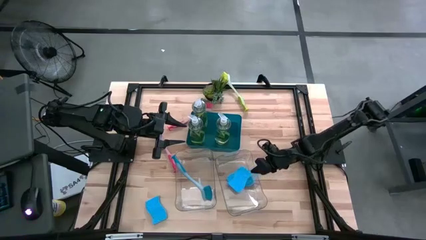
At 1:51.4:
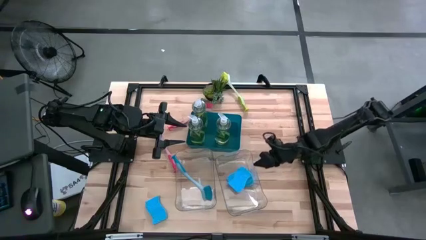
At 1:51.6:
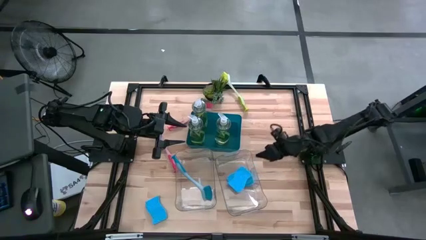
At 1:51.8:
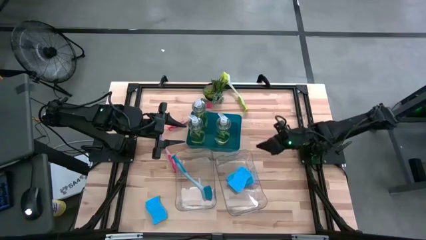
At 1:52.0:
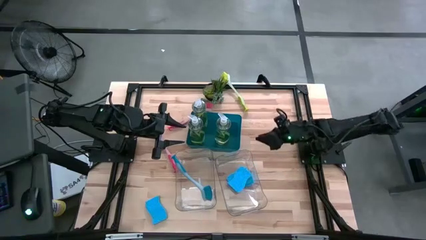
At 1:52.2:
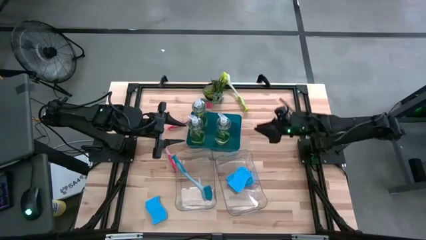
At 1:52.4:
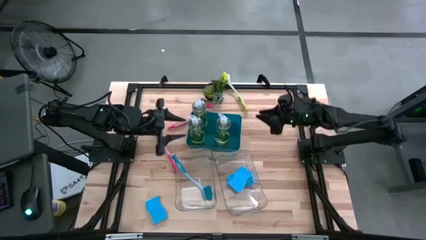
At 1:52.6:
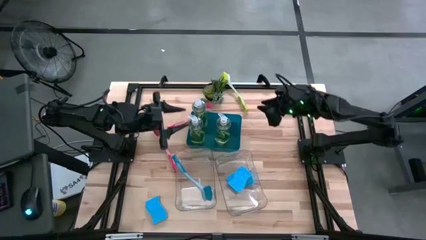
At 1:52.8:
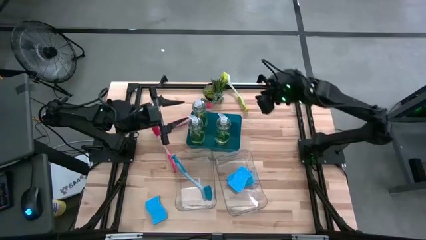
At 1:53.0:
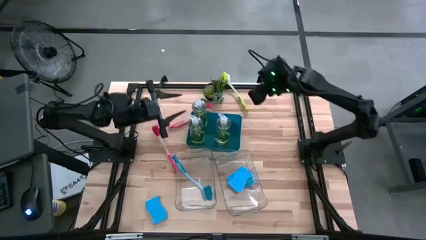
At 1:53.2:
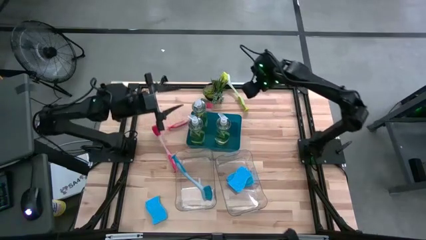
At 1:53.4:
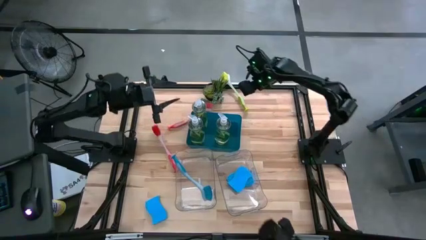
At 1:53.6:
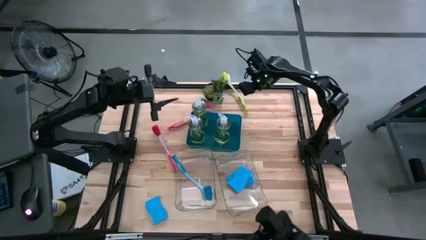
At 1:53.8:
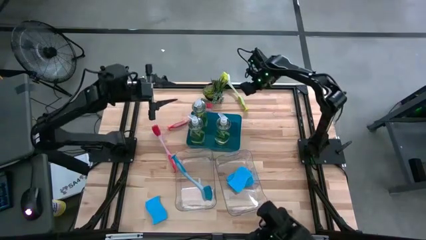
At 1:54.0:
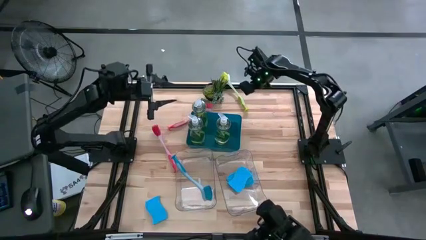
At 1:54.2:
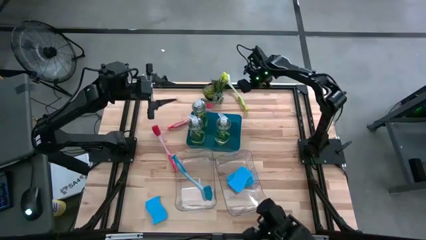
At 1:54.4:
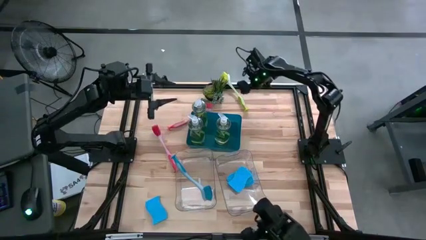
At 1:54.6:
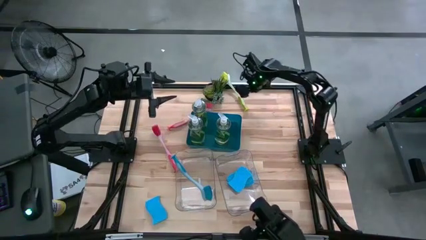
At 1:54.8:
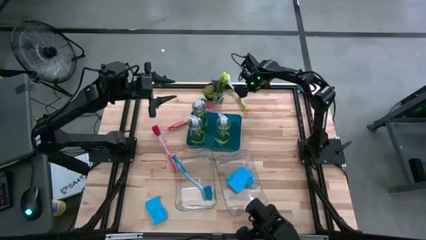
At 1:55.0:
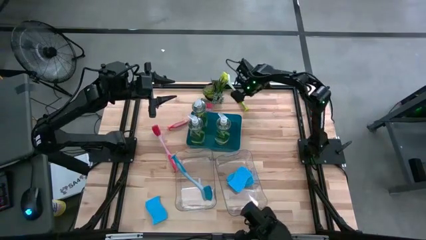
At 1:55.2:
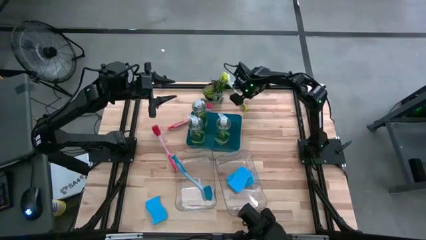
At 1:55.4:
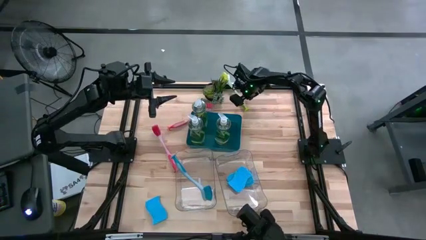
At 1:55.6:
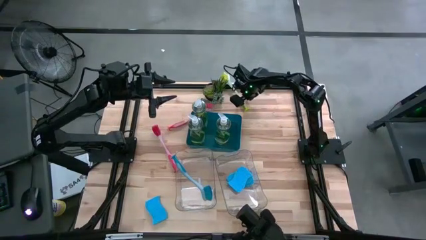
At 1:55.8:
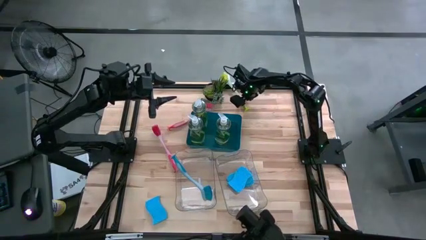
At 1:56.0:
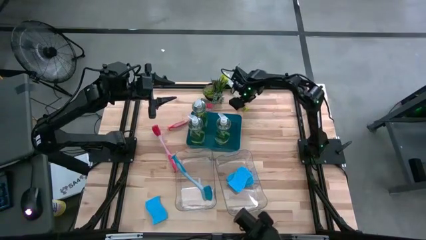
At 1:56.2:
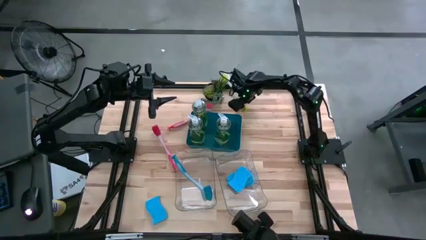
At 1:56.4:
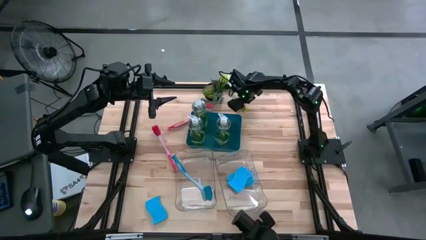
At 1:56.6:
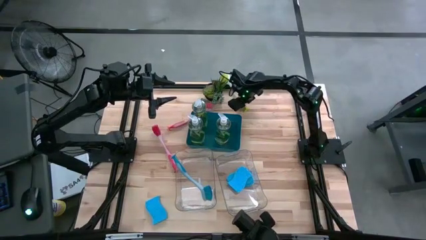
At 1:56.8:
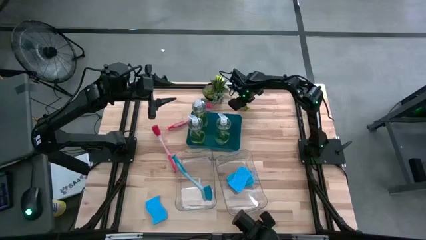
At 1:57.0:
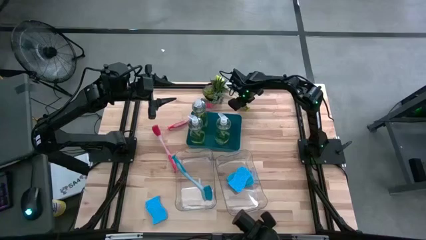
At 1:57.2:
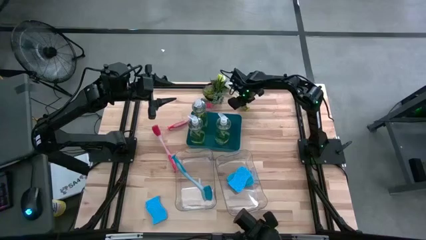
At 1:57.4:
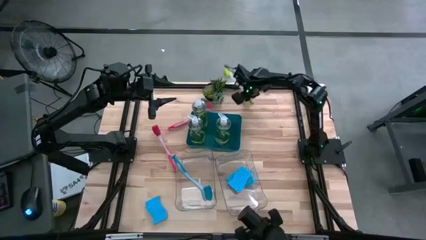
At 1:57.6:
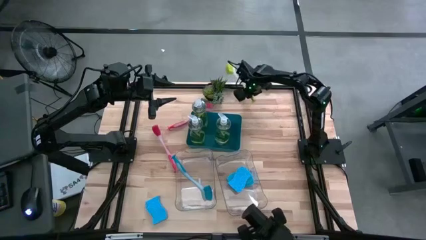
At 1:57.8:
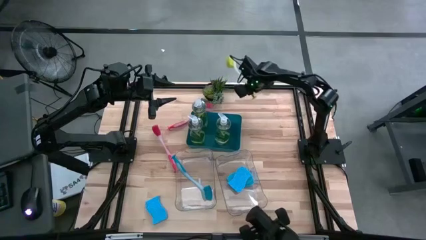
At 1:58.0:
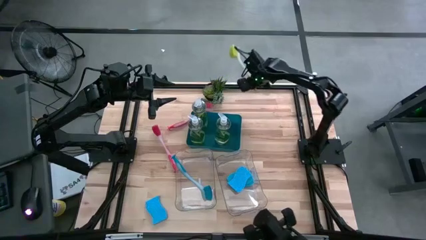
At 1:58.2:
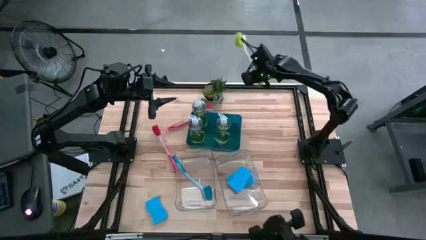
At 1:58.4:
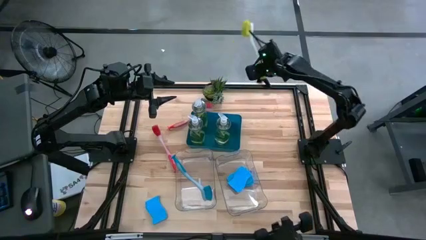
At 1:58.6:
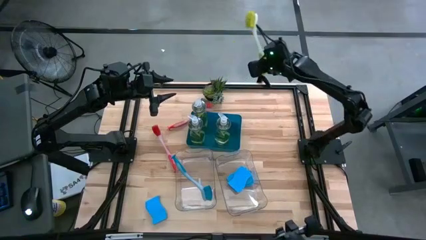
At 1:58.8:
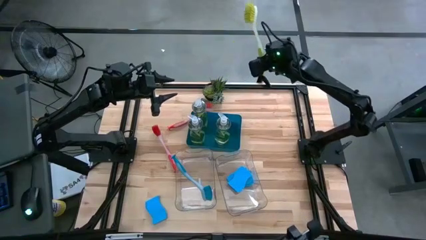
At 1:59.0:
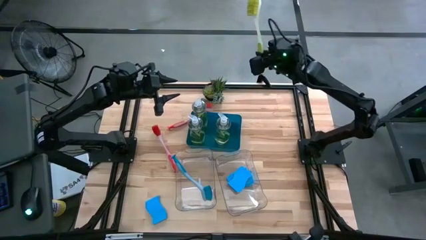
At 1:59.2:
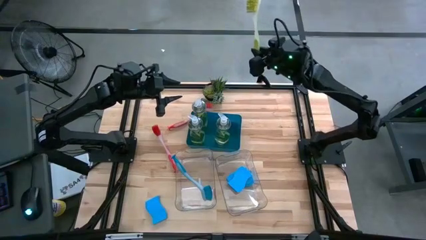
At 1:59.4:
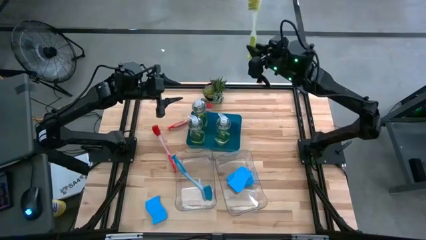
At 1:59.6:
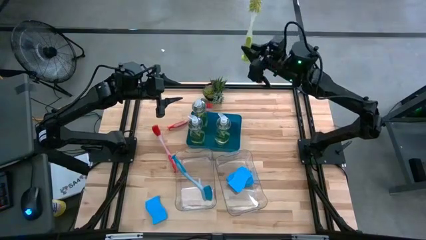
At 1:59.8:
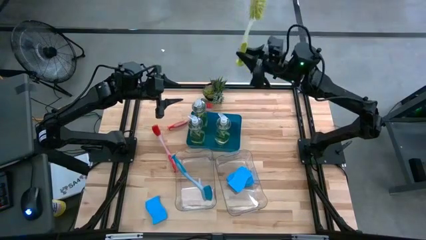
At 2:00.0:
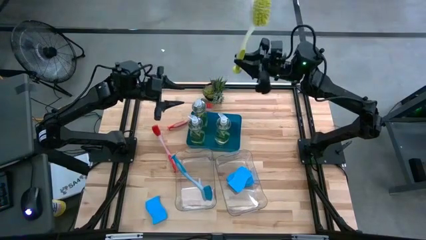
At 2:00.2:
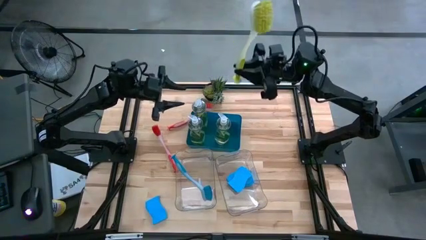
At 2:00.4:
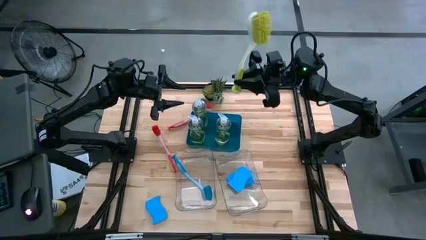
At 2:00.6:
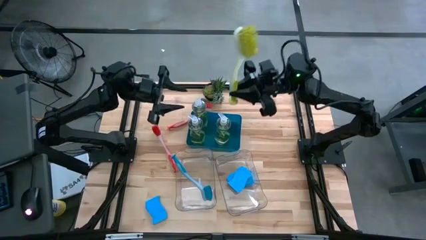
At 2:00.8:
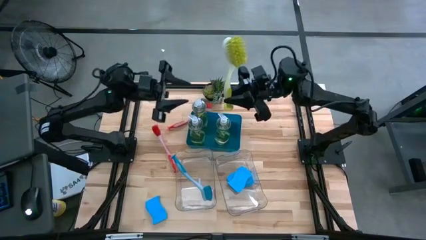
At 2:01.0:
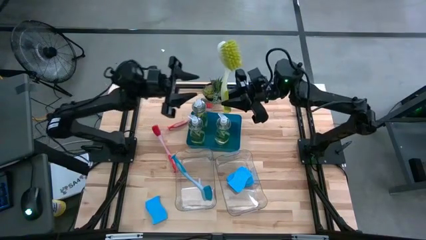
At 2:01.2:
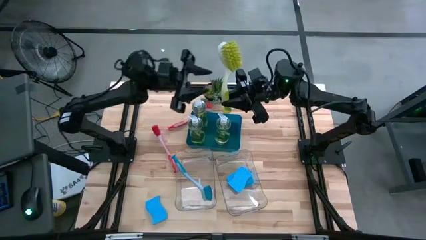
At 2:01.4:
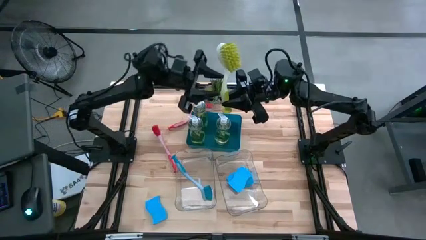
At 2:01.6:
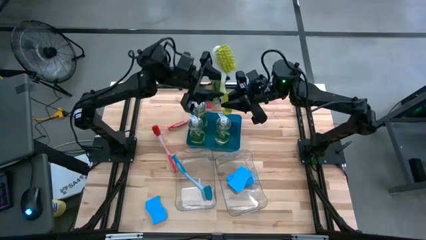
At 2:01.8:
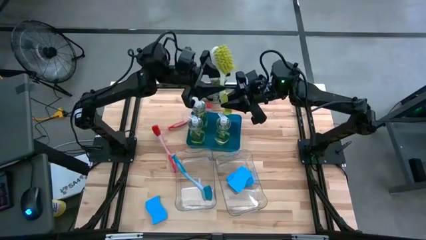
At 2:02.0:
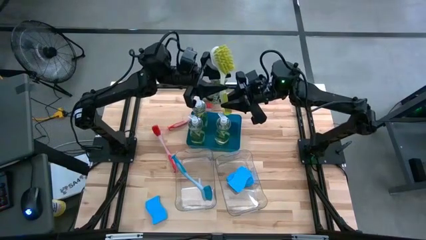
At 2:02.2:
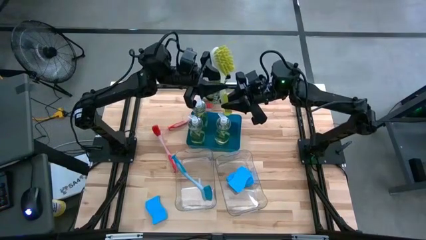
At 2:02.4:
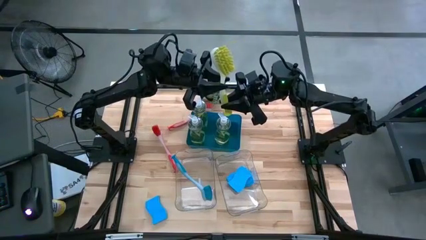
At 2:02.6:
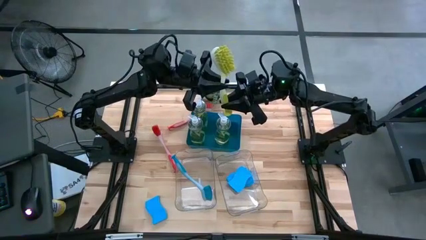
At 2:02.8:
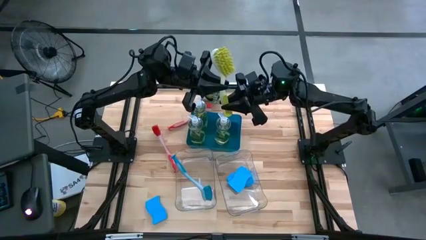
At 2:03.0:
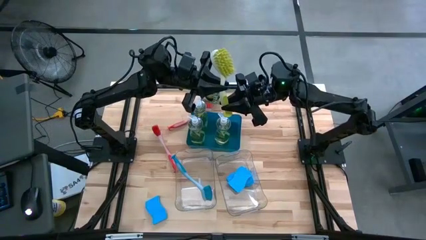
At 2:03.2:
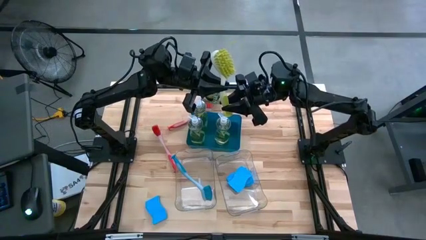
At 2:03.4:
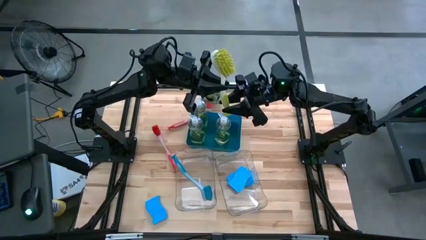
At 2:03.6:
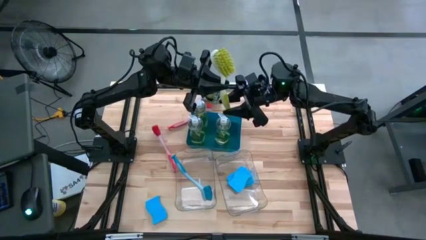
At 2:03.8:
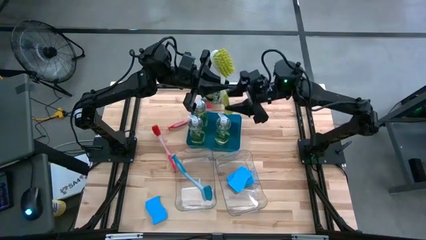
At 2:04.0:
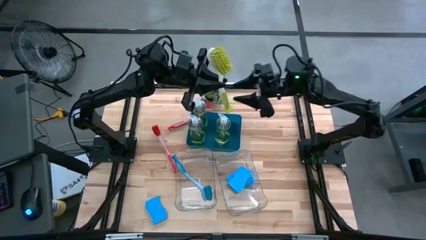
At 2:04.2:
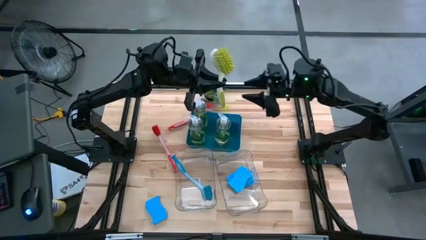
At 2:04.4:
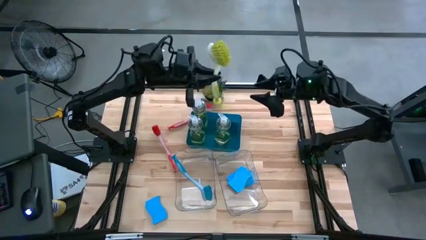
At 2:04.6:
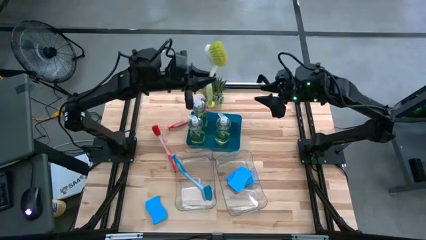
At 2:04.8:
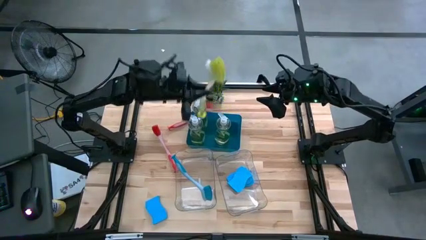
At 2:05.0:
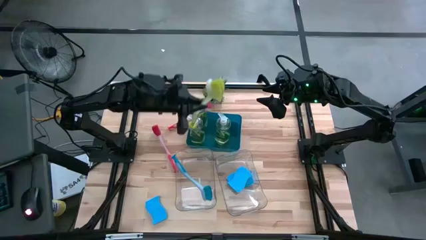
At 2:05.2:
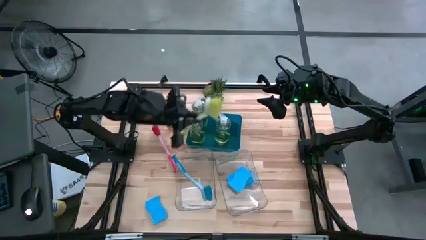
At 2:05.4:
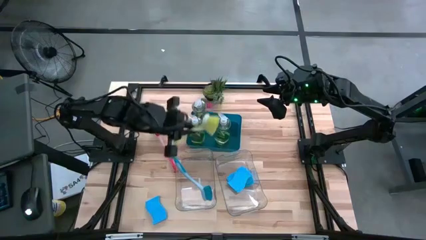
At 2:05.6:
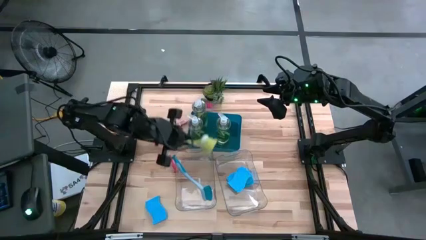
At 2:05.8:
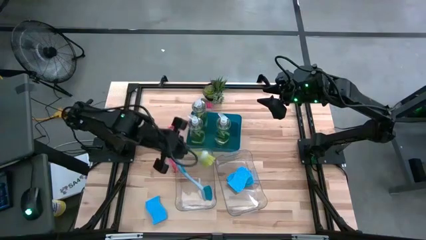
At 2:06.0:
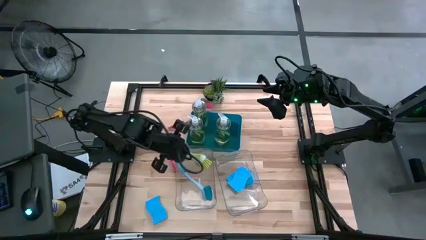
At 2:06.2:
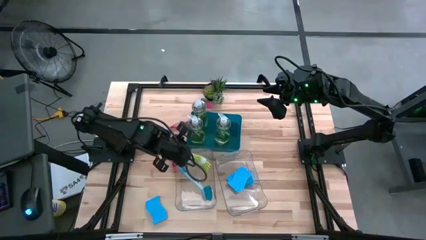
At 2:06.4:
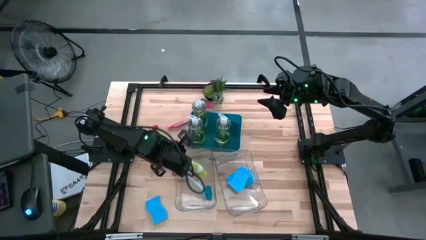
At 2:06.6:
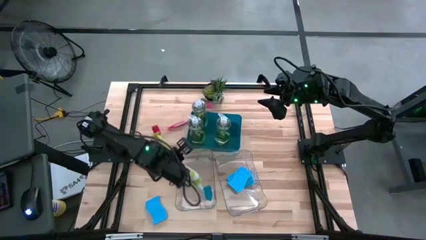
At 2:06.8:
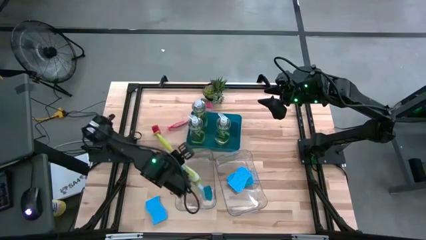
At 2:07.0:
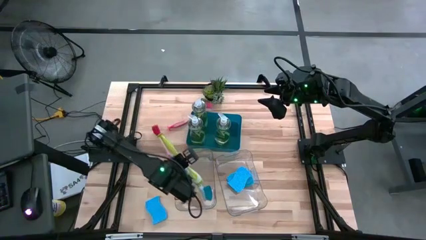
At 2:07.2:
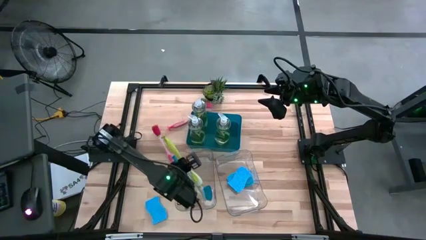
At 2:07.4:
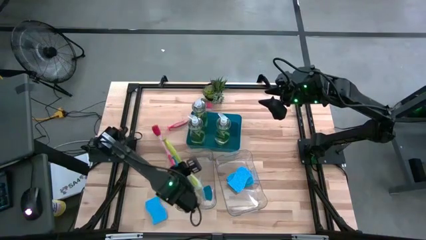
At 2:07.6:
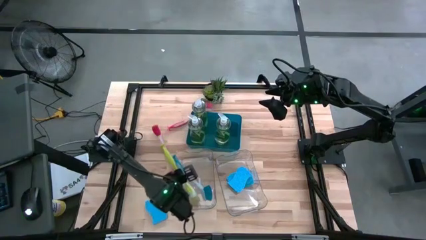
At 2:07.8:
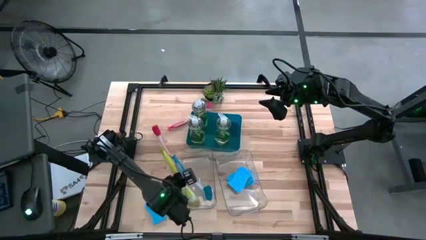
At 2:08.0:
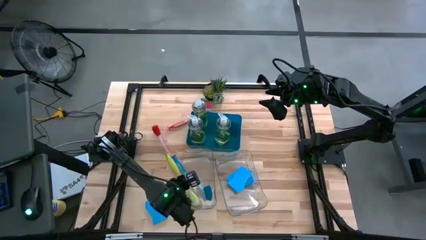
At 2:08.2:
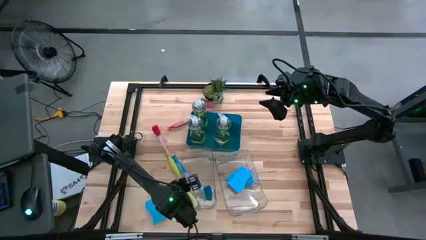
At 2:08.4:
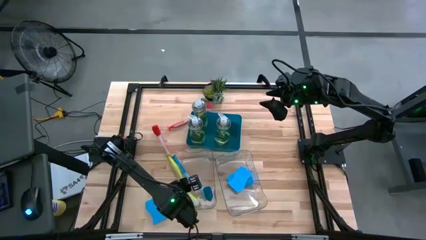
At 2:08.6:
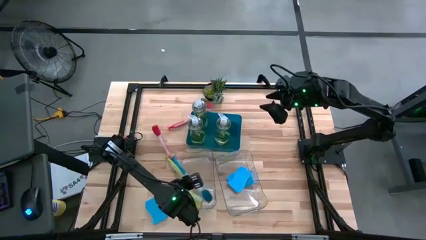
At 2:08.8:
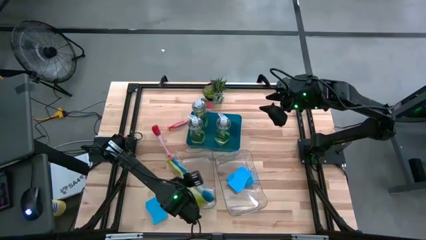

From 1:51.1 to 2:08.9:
Task: Pick & Place Kitchen Sink Supplies
Put the green dish brush into the left transparent bin
